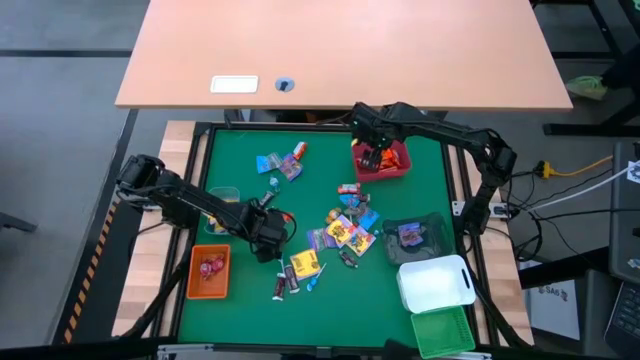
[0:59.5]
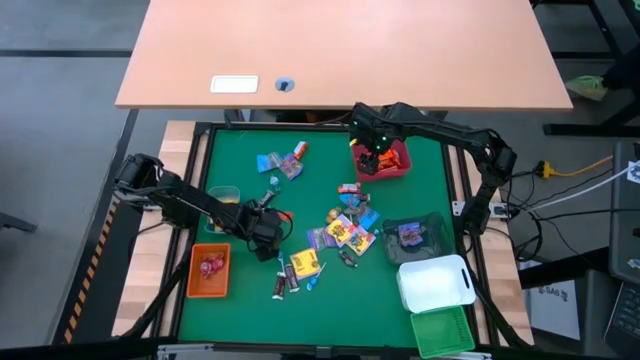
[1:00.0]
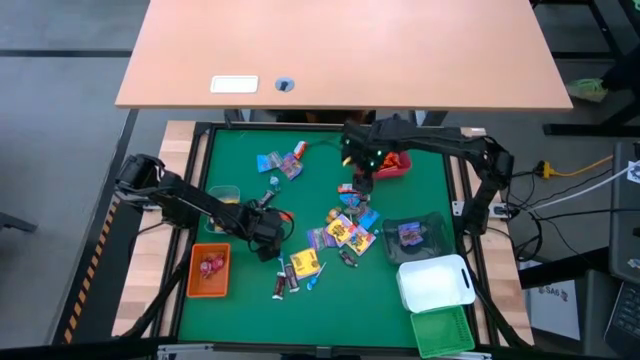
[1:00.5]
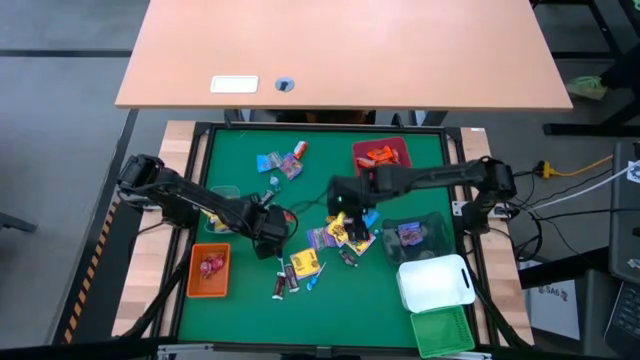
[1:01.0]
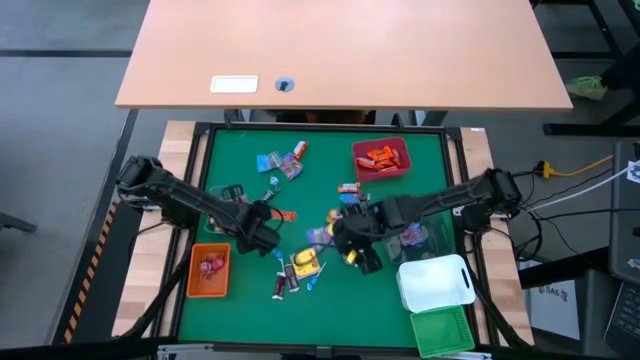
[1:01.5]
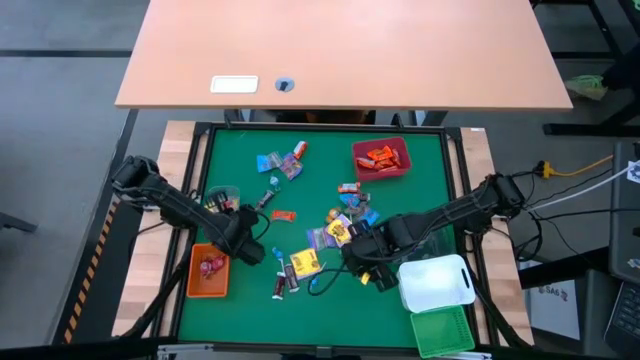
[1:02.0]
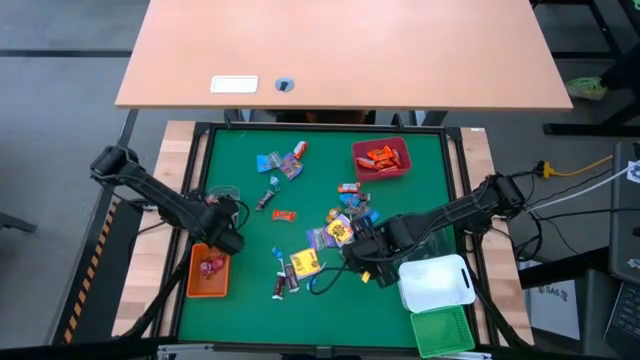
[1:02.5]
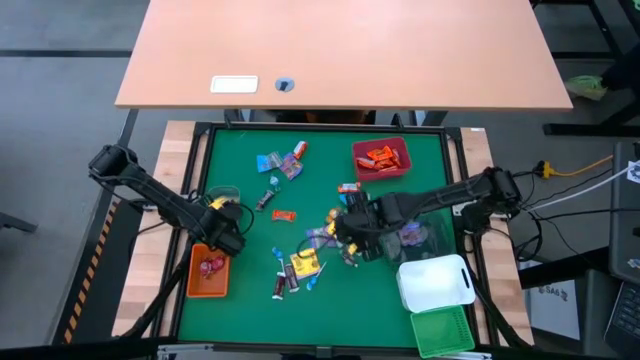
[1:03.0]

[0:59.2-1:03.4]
Task: Sort candy
Put the yellow candy into the blue bin

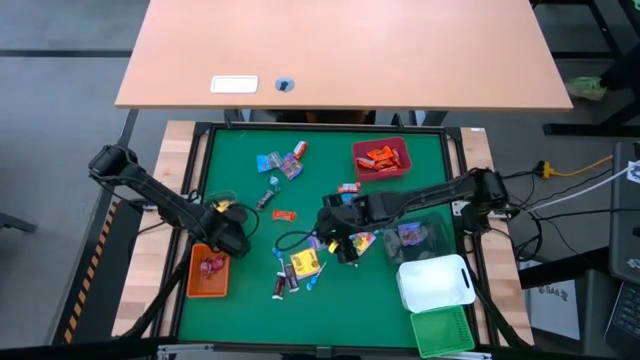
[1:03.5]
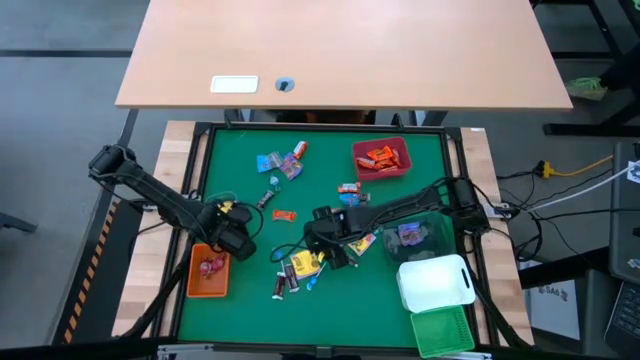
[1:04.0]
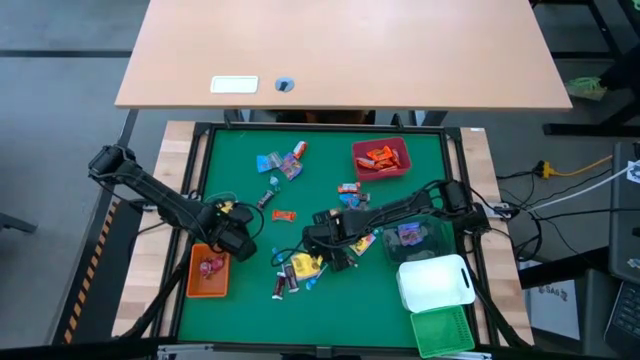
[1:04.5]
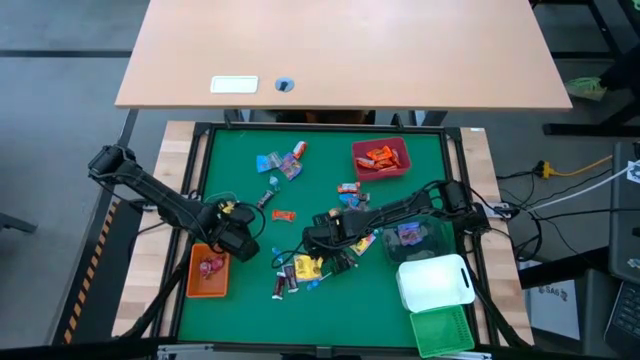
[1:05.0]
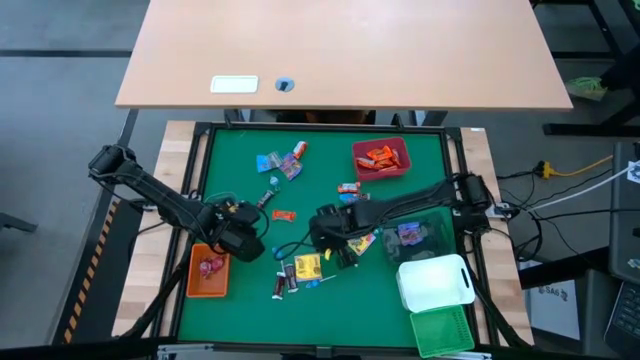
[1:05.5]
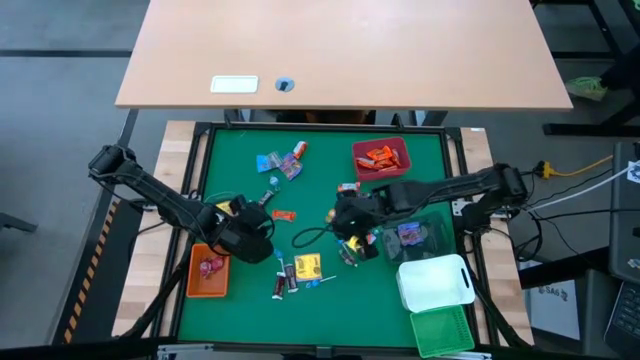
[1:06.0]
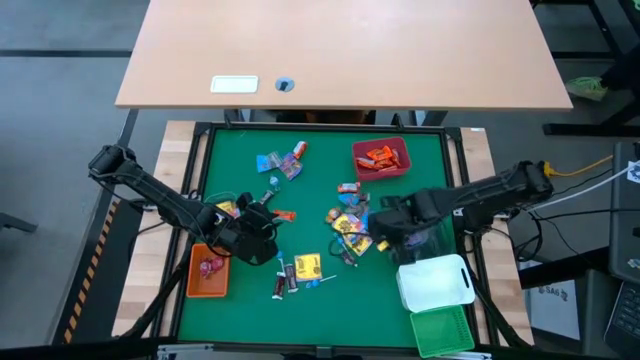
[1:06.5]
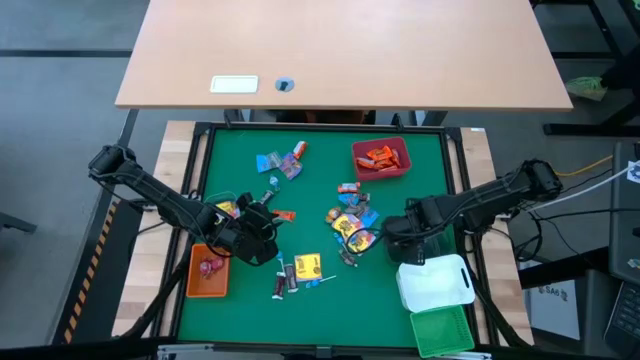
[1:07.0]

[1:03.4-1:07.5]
Put the violet candy into the black bin

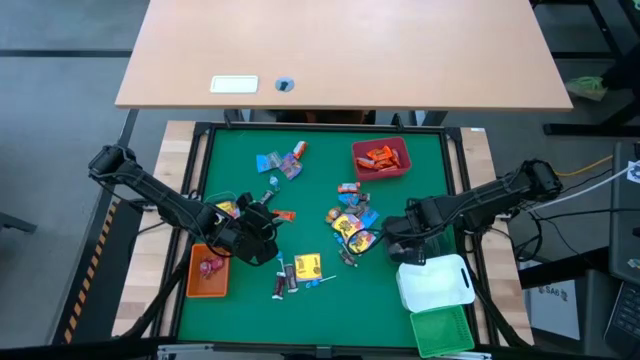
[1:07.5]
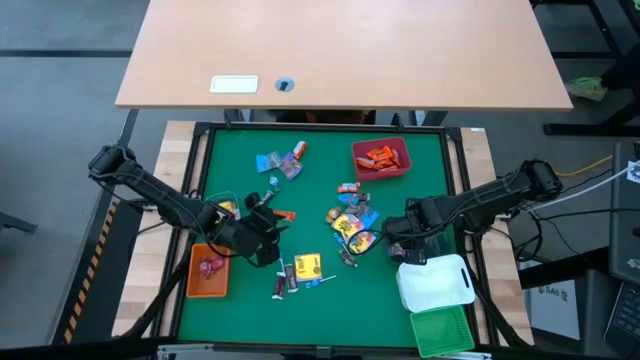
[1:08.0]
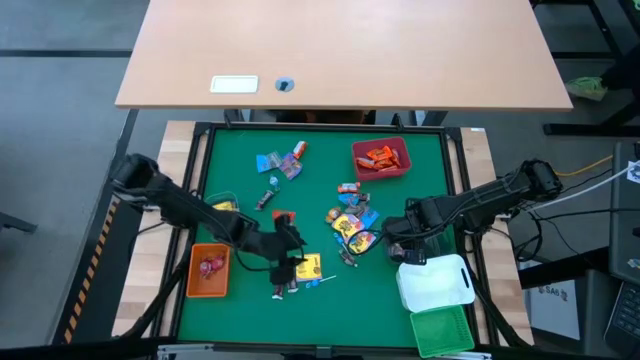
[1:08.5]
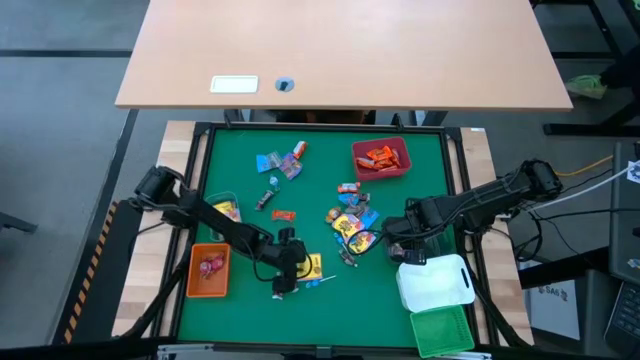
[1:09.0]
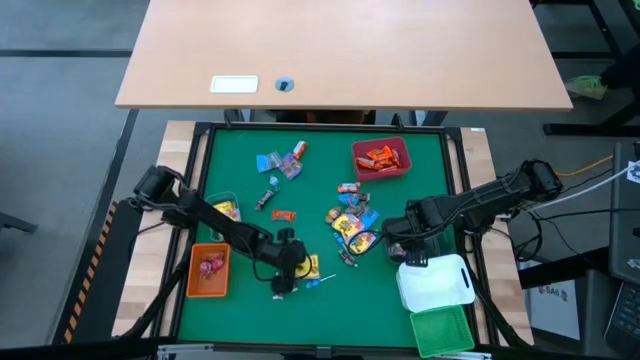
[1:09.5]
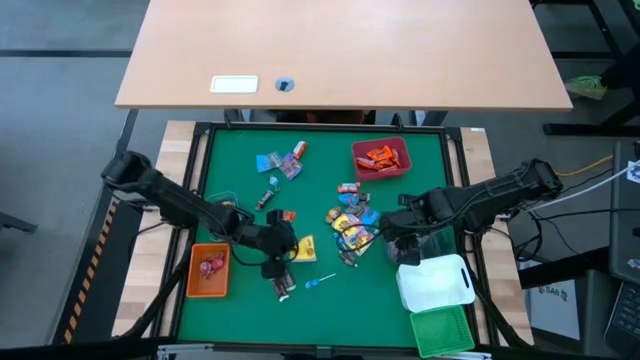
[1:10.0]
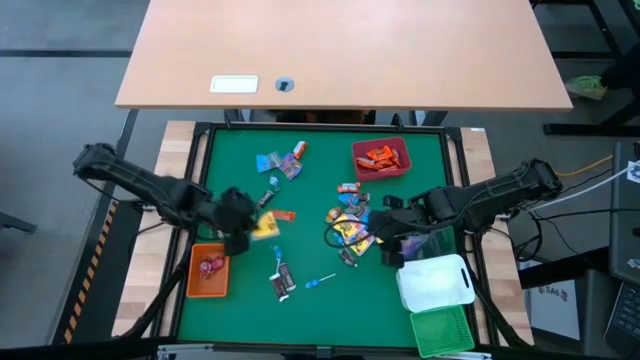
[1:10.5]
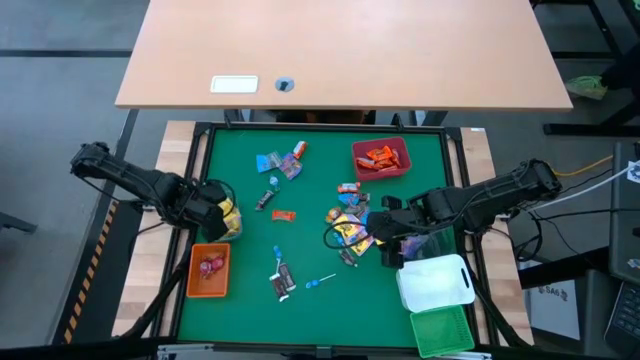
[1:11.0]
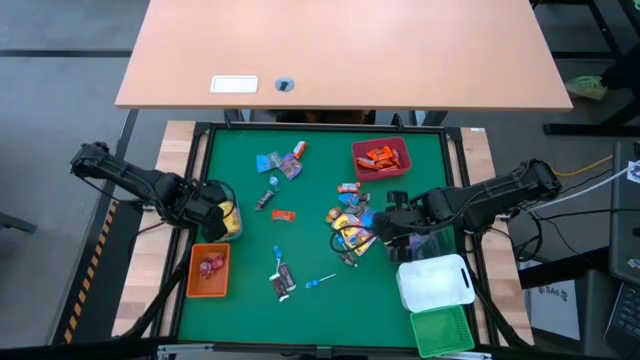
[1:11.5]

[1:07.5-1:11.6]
Put the yellow candy into the blue bin

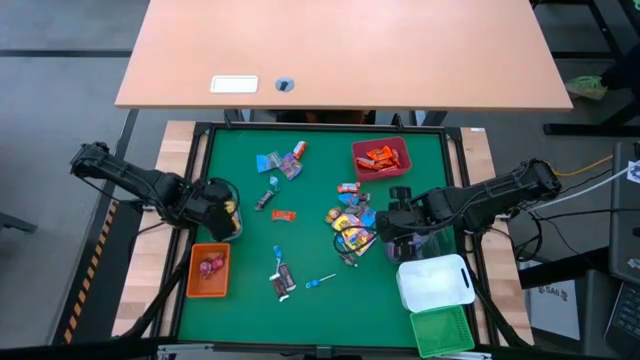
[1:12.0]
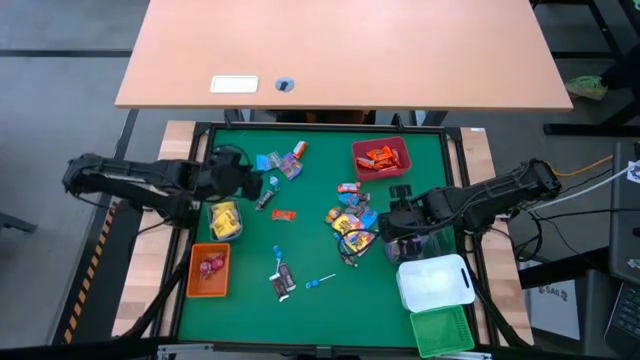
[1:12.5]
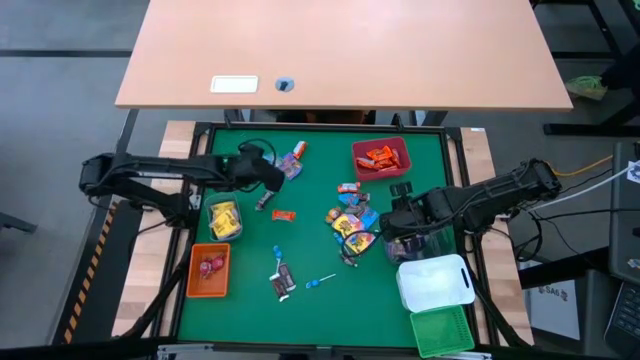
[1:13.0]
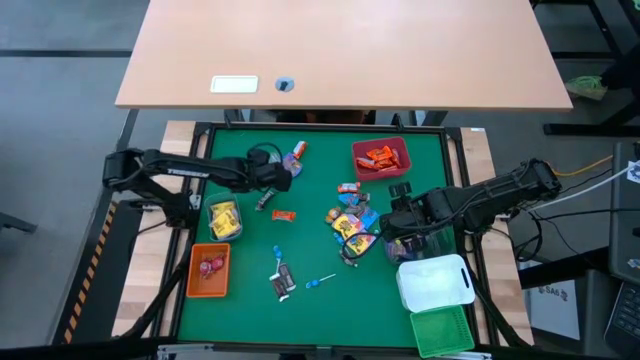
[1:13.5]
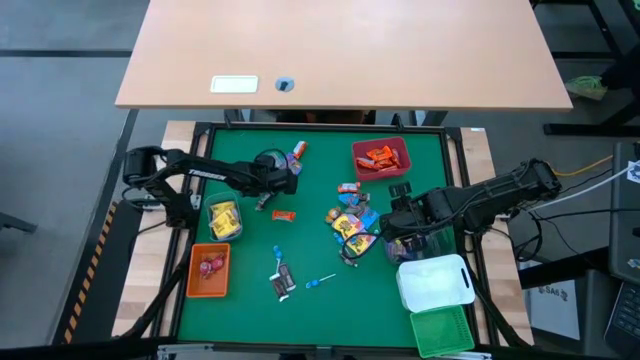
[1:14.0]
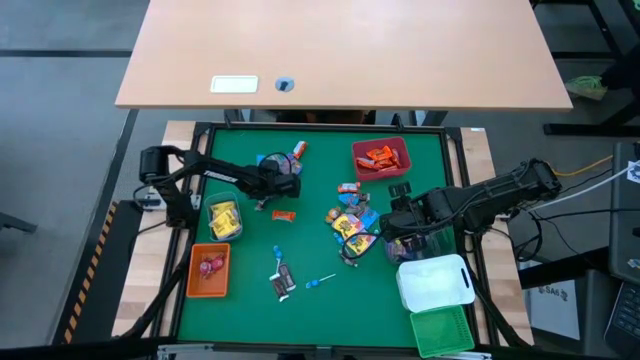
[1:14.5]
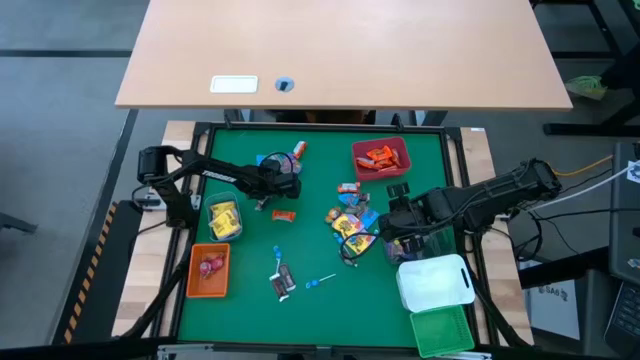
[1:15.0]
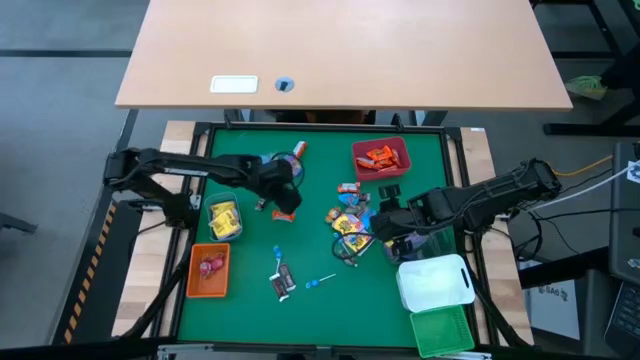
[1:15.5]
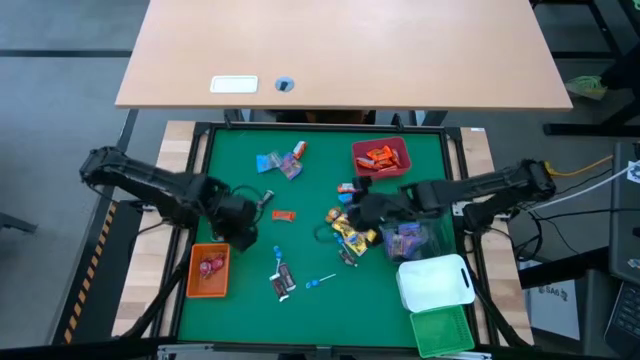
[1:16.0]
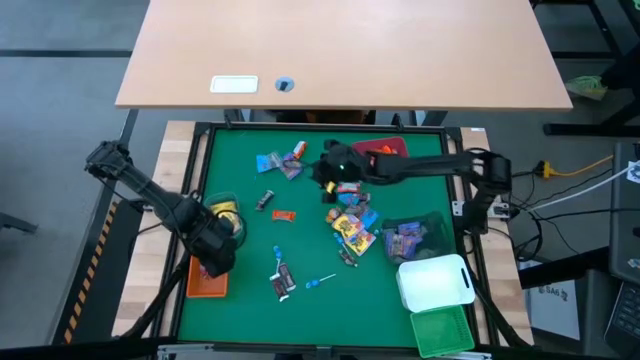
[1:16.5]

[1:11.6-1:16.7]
Put the blue candy into the orange bin

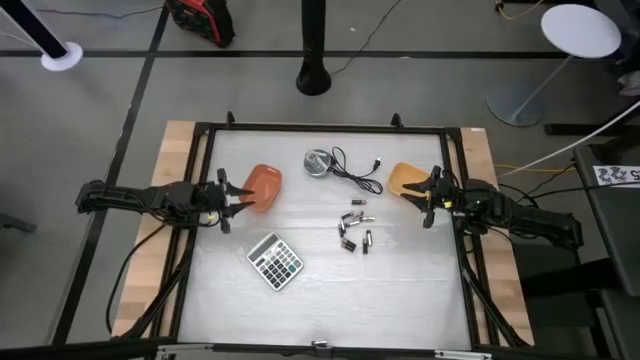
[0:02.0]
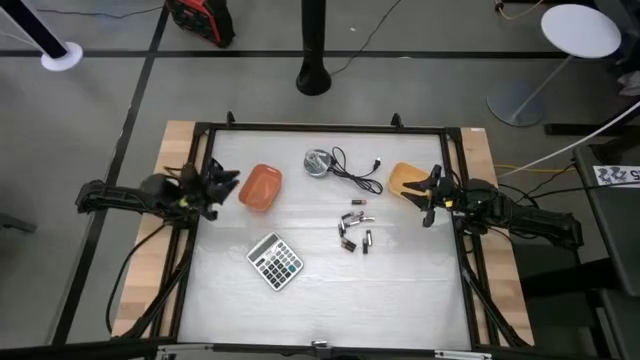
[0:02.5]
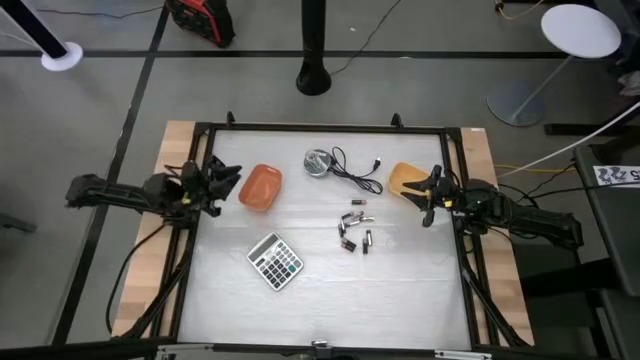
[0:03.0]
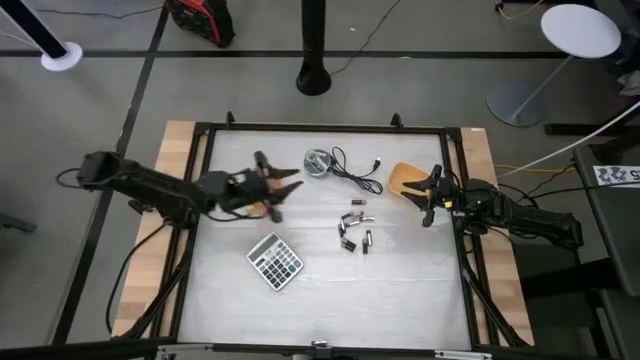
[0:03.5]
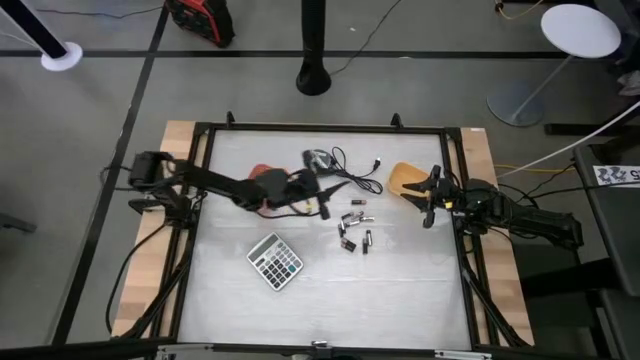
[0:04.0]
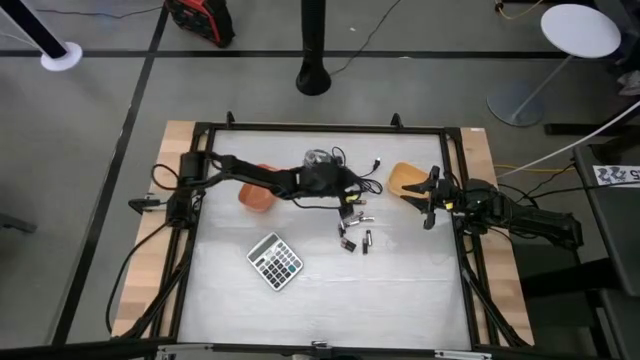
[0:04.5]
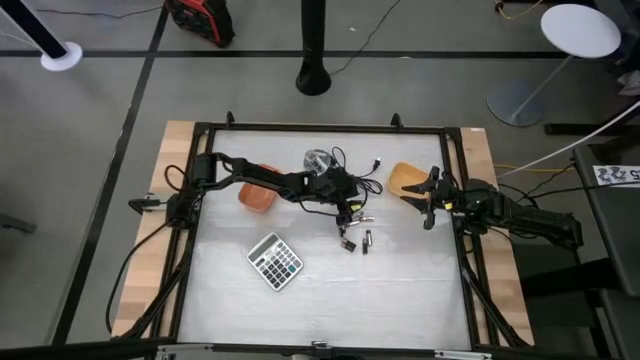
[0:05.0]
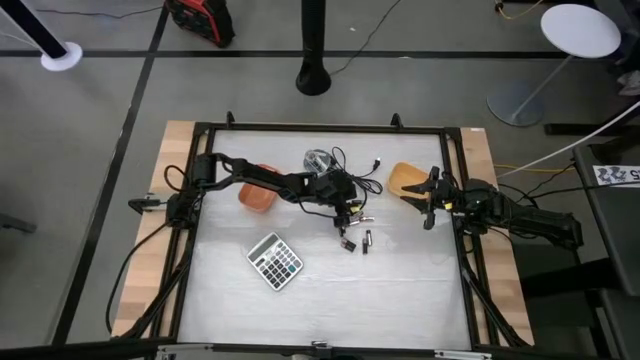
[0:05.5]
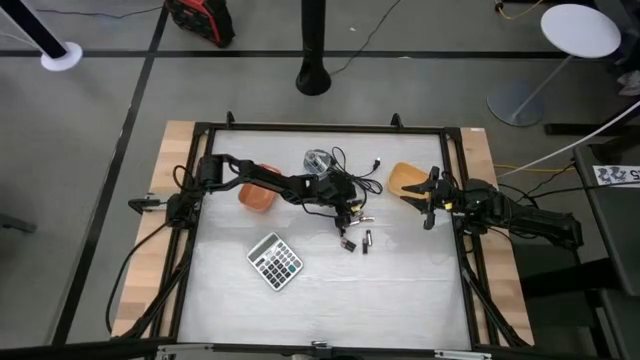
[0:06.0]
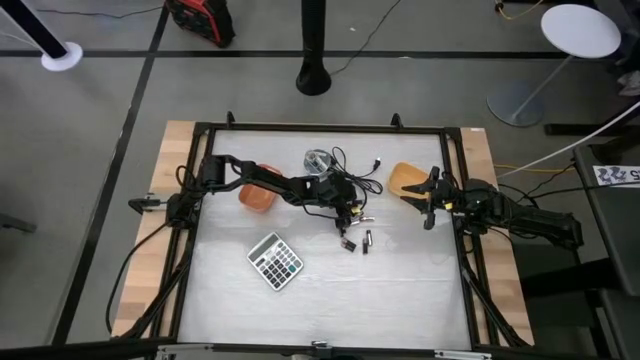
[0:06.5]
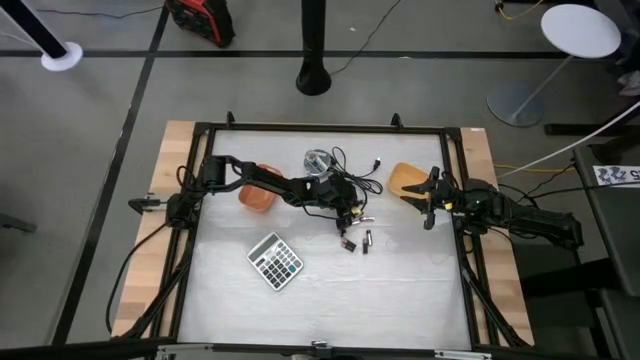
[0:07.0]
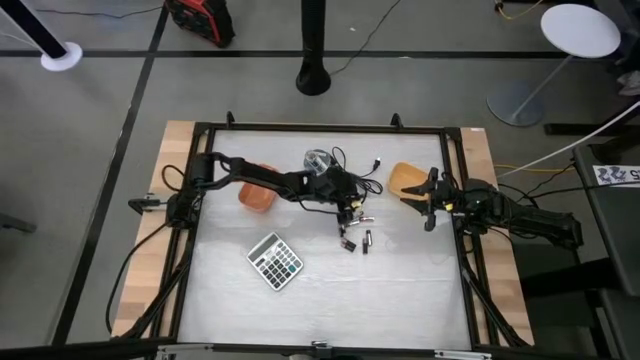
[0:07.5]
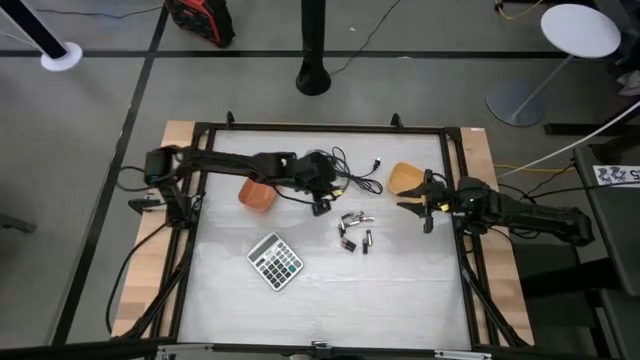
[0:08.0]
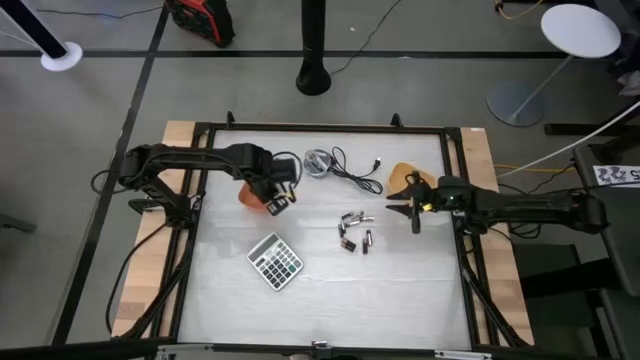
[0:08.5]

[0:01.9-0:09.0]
Task: Sort batteries
Put the black battery into the orange bin
